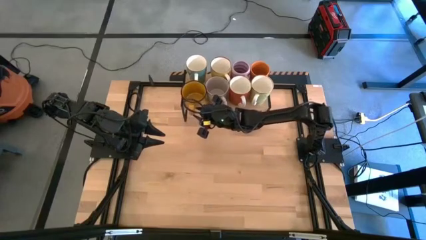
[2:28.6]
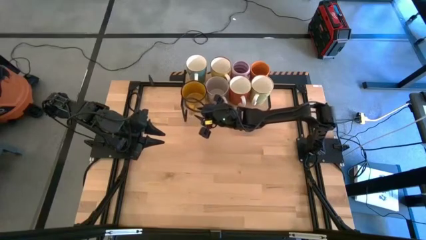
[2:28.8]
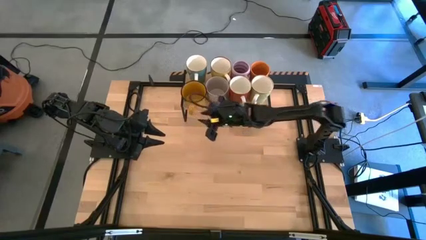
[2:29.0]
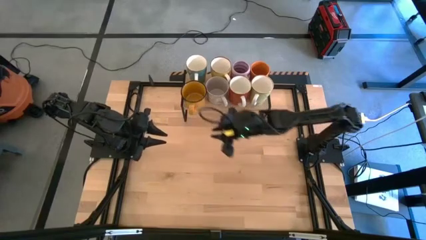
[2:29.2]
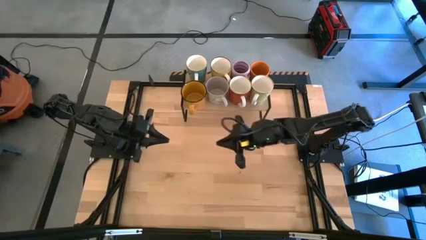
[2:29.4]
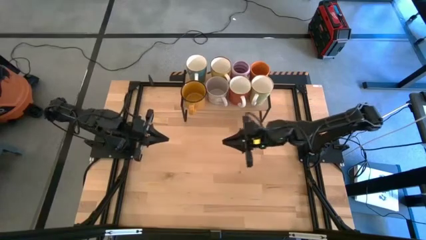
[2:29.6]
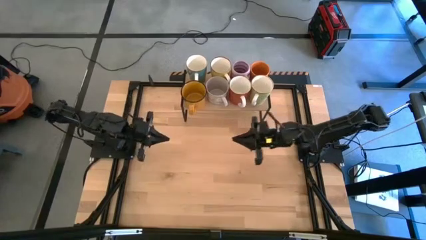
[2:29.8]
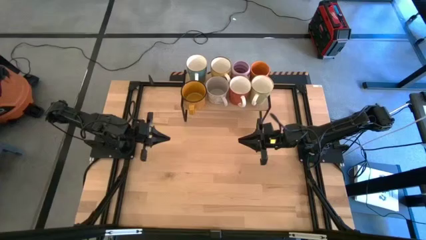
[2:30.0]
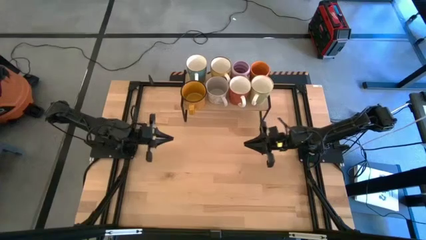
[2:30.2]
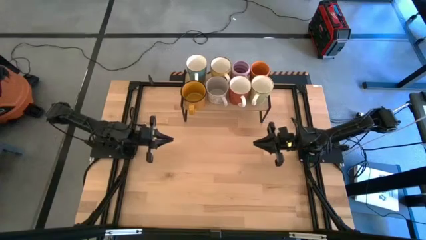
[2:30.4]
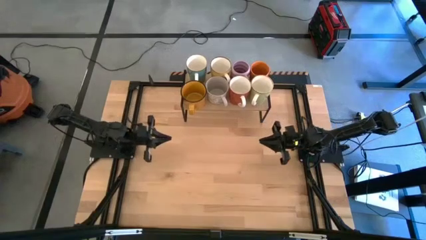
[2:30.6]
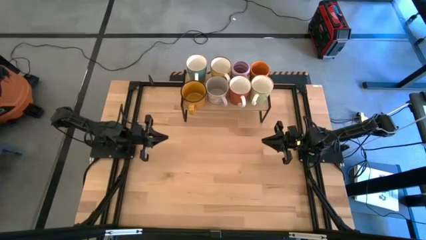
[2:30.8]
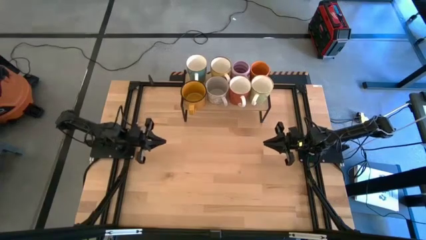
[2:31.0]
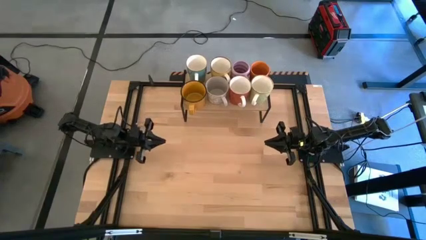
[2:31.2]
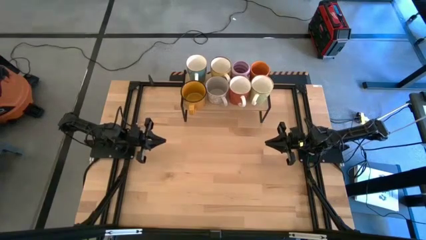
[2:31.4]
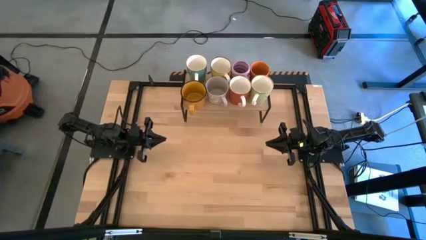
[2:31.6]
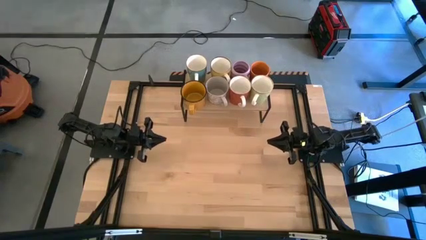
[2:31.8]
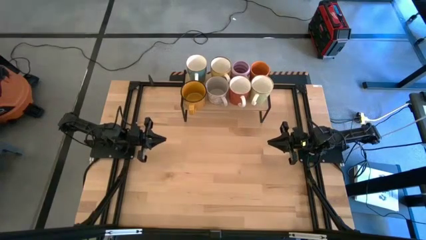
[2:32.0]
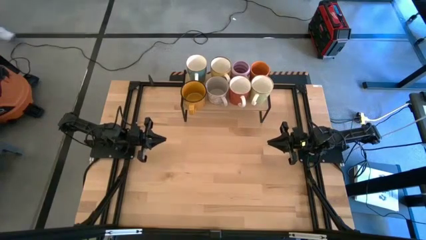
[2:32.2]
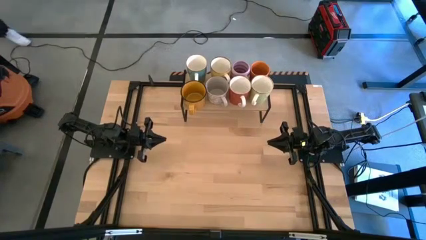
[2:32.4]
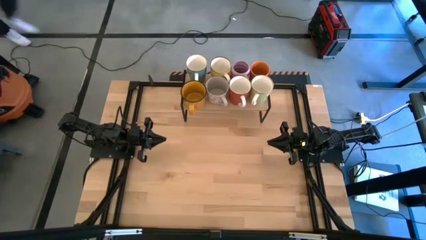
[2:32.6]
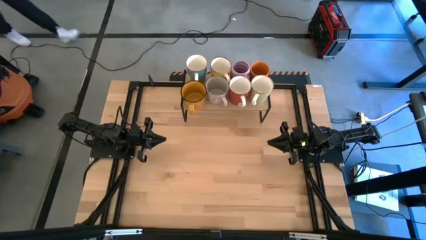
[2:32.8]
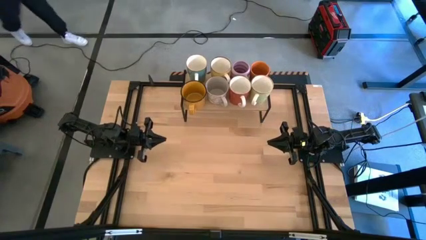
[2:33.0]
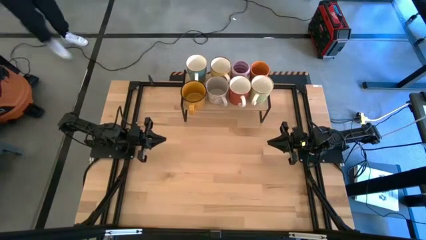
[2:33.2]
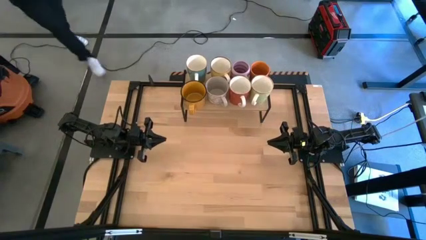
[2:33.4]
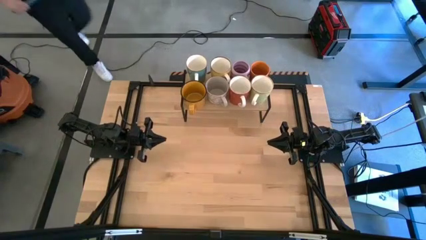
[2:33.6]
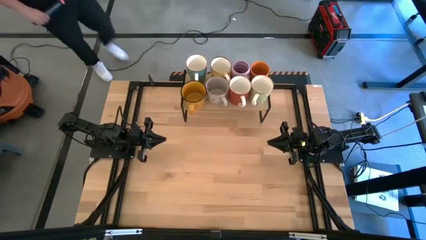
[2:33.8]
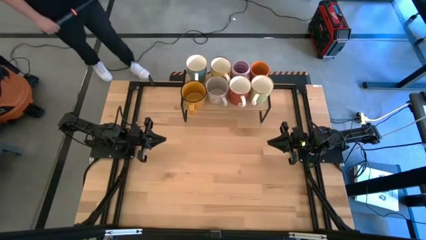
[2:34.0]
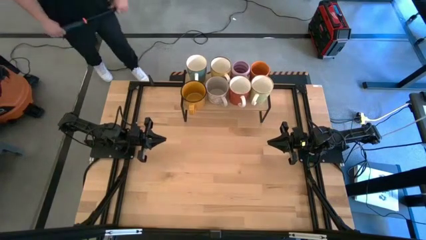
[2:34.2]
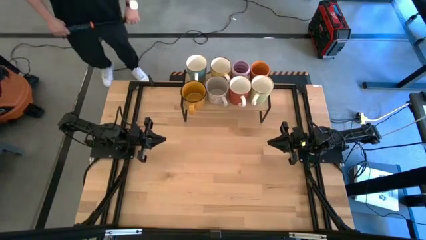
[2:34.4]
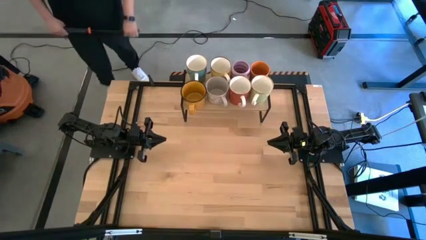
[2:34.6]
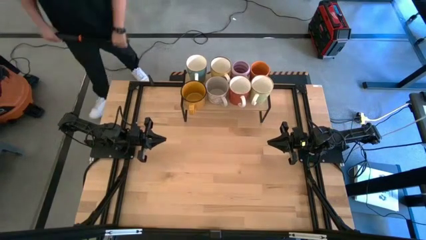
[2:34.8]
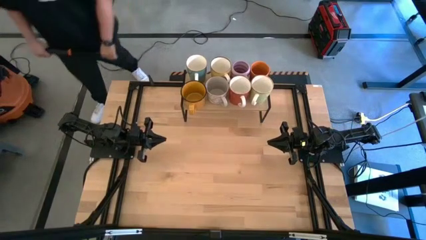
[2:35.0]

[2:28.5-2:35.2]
Task: Place coffee mugs
Return to Home Position

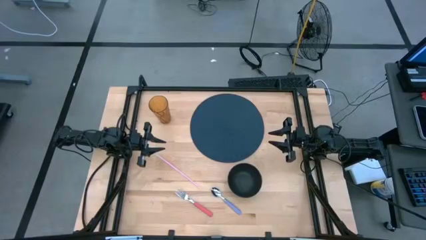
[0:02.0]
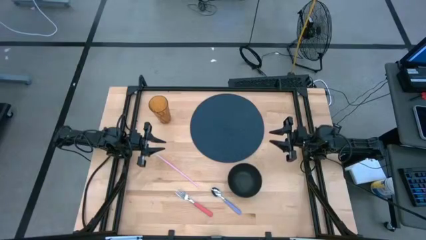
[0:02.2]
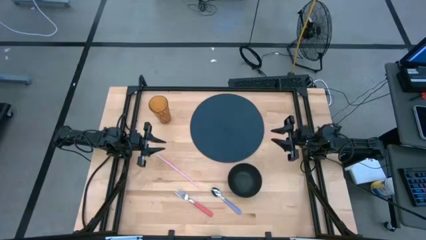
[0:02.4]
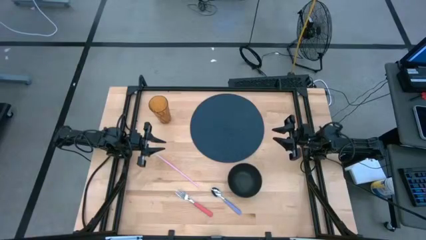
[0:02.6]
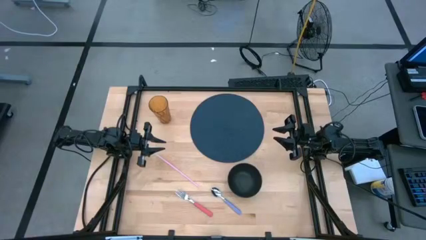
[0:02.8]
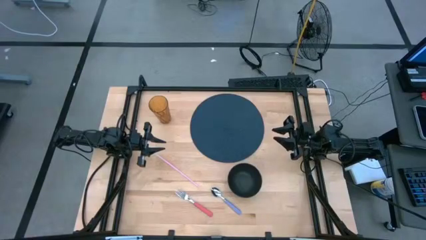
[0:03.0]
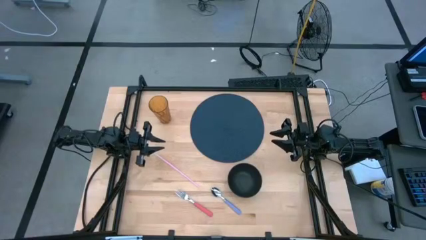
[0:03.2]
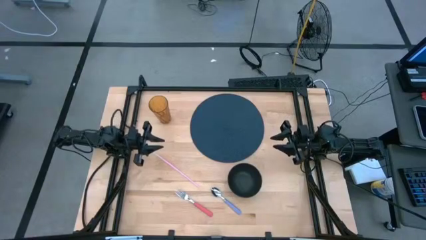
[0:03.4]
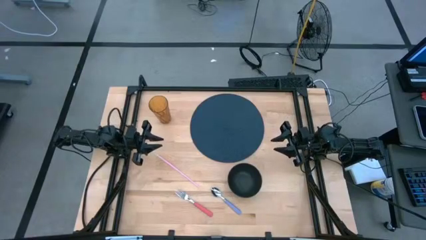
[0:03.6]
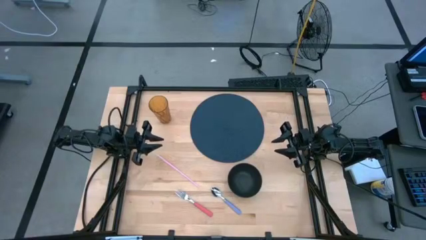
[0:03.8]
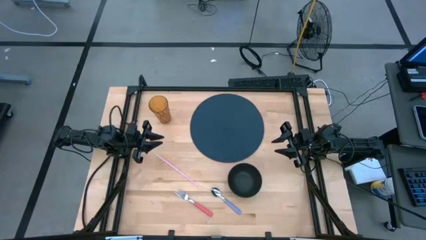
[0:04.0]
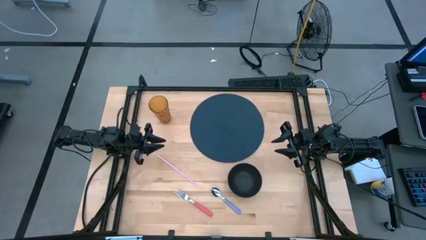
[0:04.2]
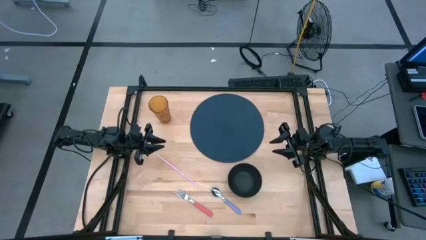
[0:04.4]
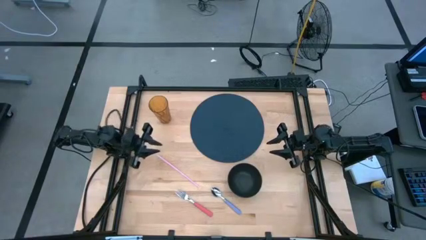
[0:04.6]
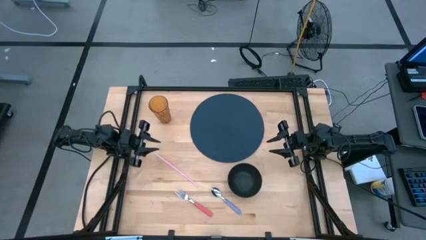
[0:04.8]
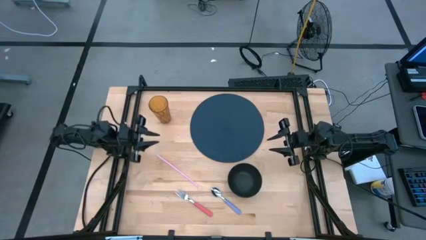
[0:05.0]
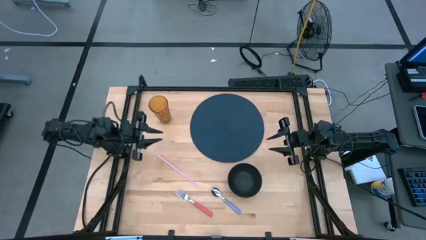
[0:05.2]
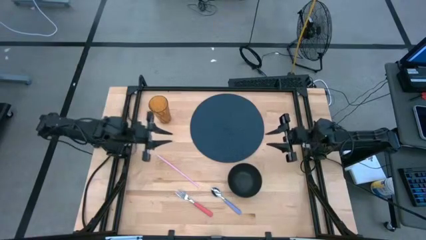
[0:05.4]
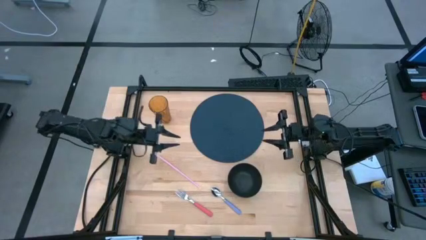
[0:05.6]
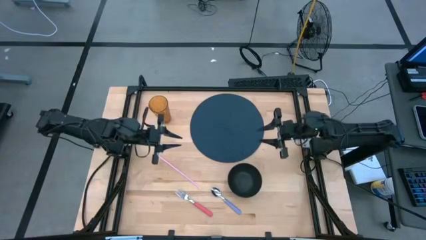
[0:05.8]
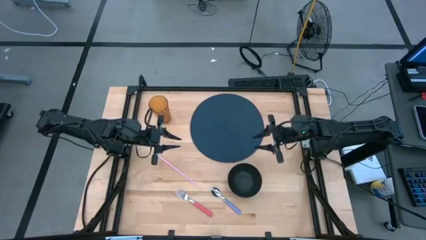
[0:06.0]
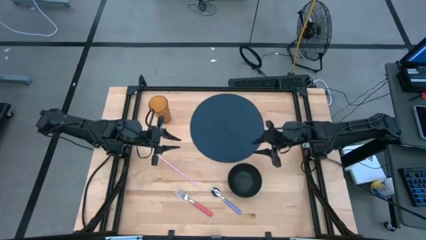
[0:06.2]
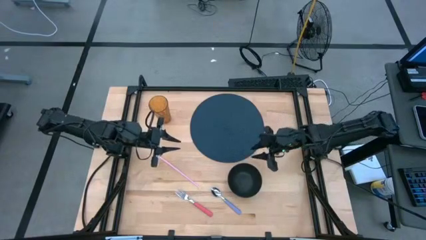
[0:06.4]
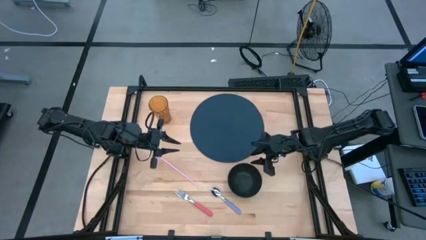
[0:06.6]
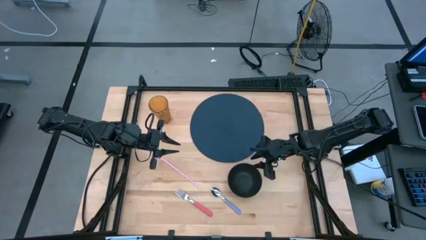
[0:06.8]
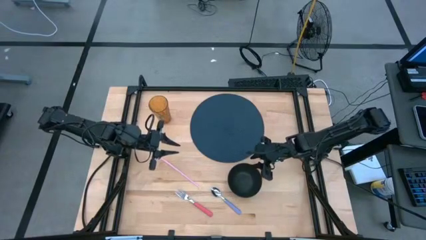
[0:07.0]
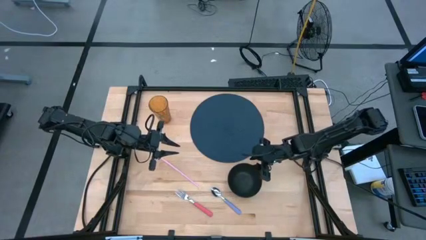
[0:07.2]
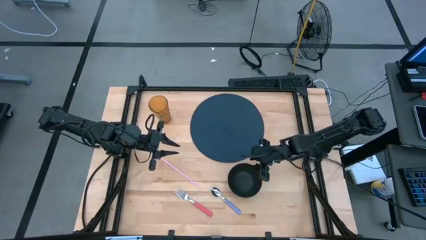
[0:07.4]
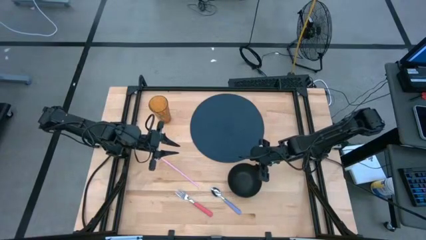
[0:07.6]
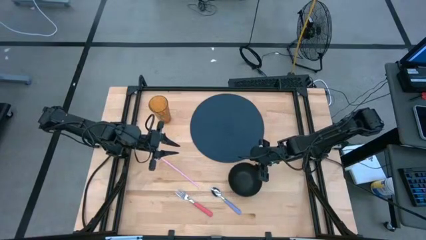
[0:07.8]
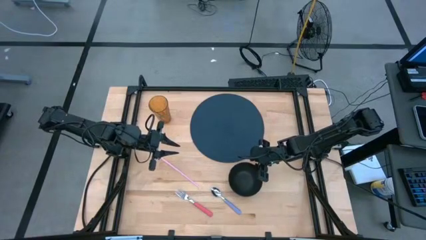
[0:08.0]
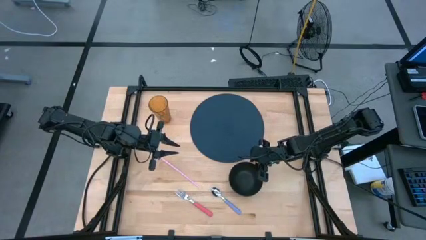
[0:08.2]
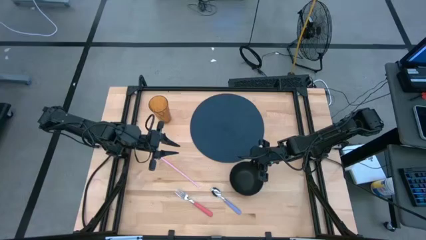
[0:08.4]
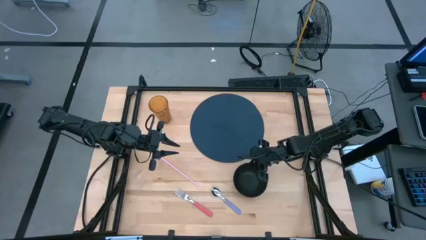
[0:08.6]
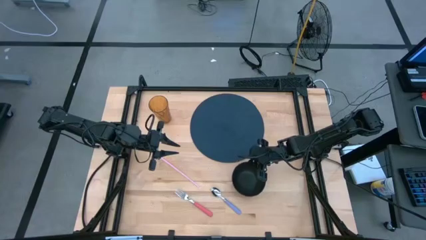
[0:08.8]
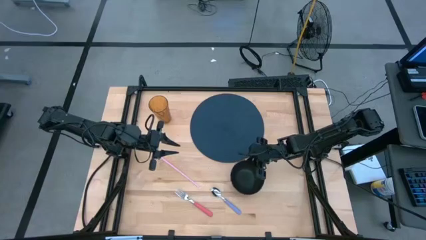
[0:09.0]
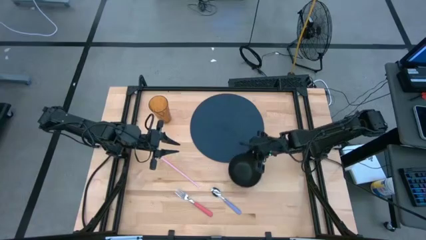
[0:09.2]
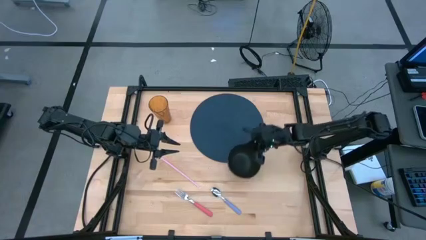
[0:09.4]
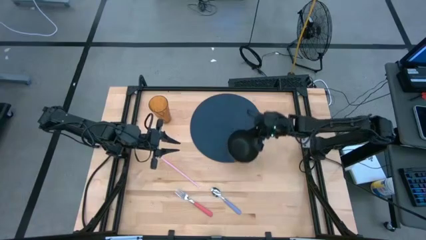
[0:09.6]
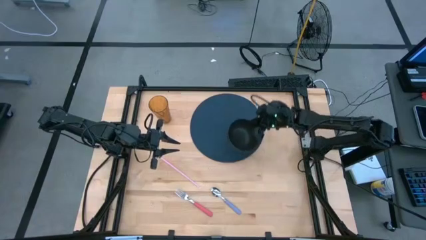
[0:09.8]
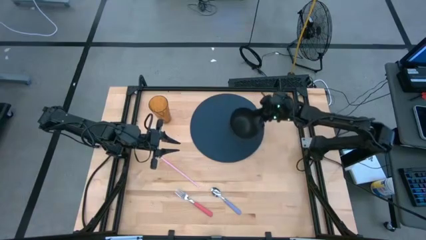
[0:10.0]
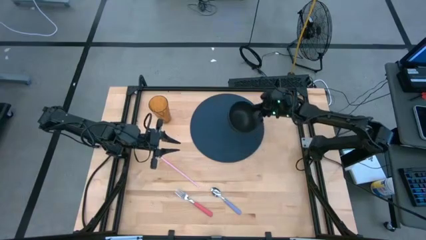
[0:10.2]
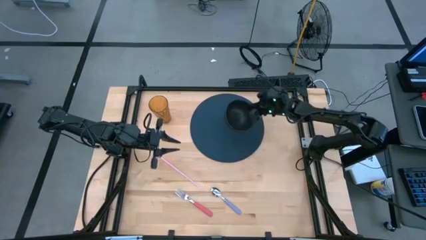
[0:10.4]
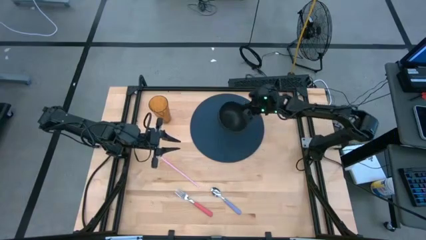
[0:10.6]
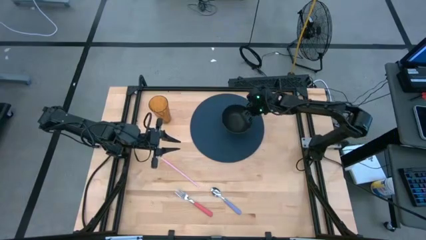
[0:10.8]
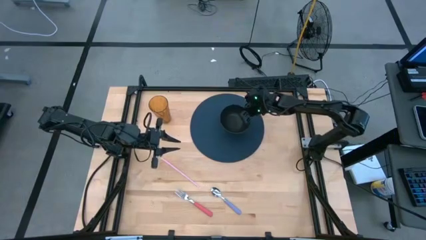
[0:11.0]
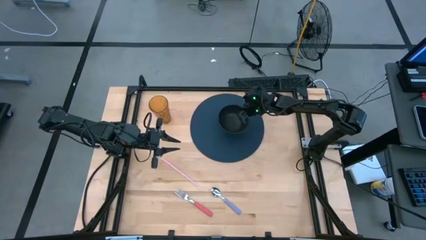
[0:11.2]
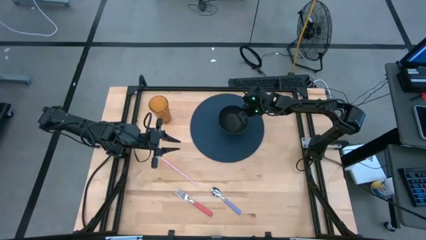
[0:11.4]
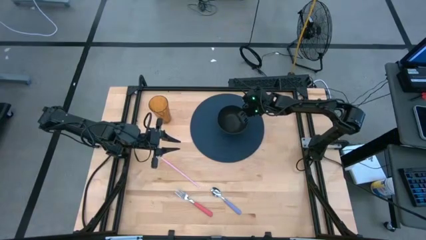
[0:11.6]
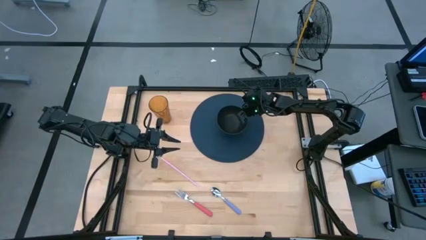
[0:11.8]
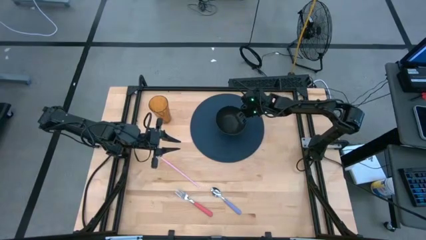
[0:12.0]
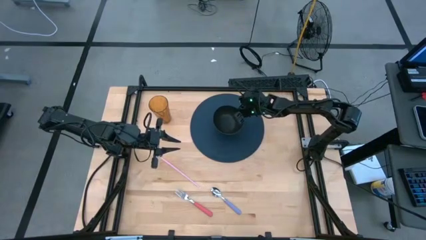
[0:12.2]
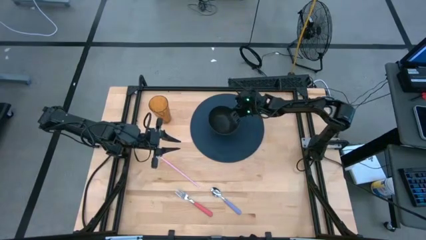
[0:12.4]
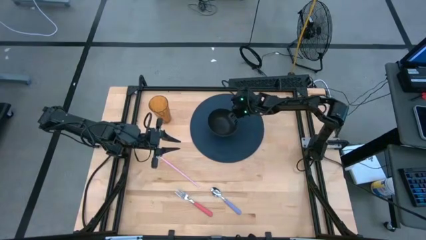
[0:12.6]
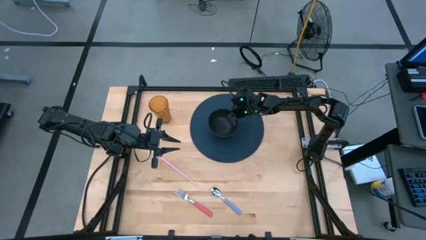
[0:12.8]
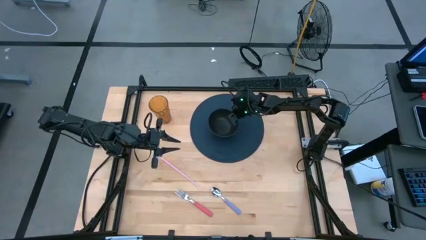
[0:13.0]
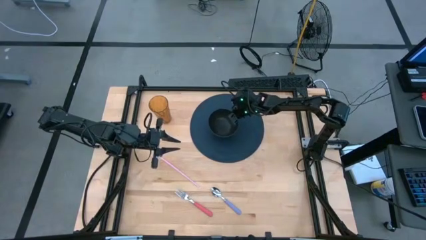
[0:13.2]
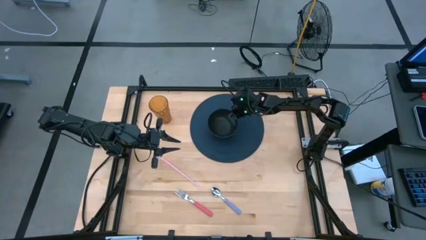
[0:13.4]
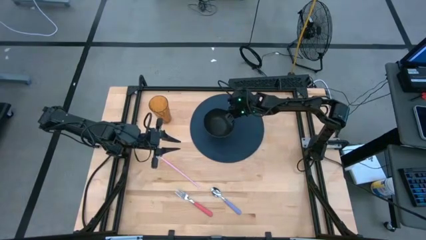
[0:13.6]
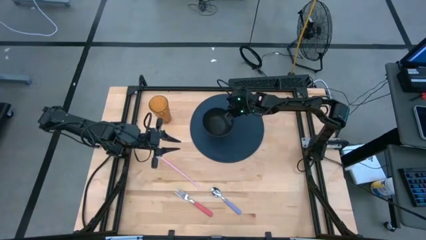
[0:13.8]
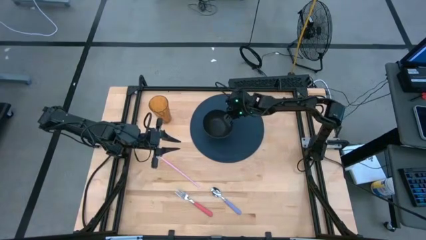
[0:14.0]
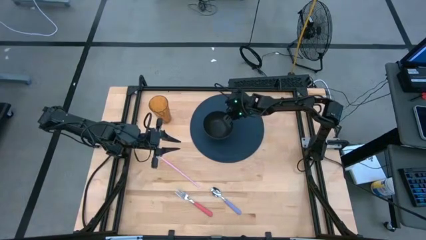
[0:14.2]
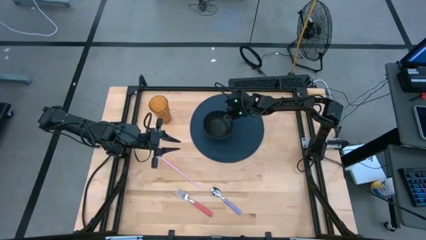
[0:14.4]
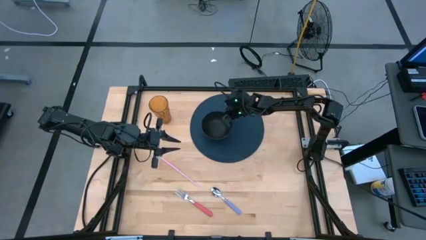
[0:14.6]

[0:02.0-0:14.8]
Task: Pick & Place Utensil
Put the bowl on the middle left of the mat
